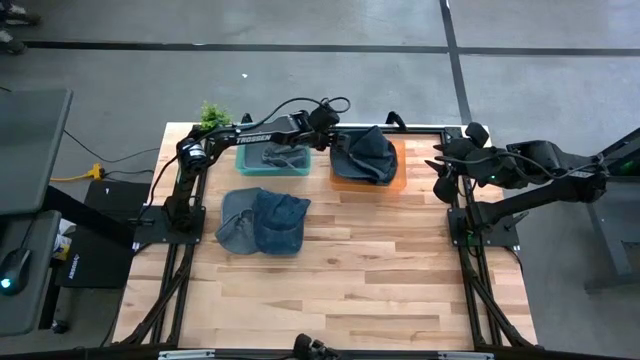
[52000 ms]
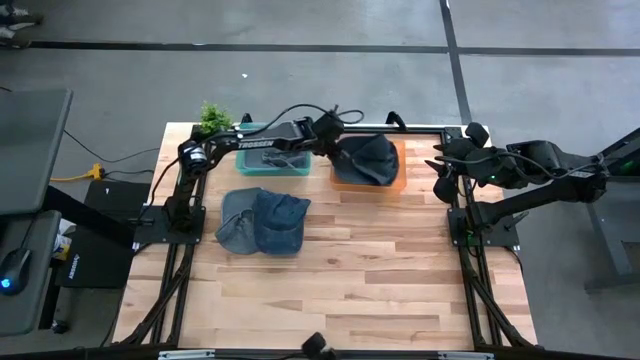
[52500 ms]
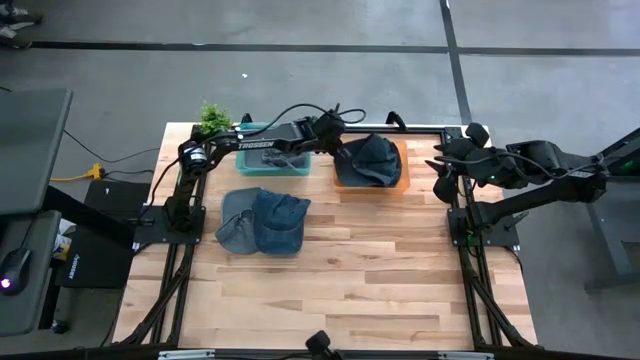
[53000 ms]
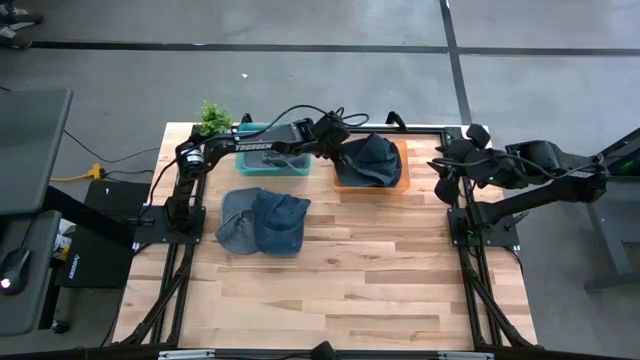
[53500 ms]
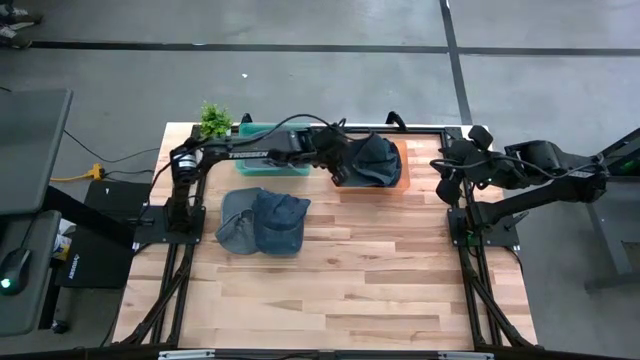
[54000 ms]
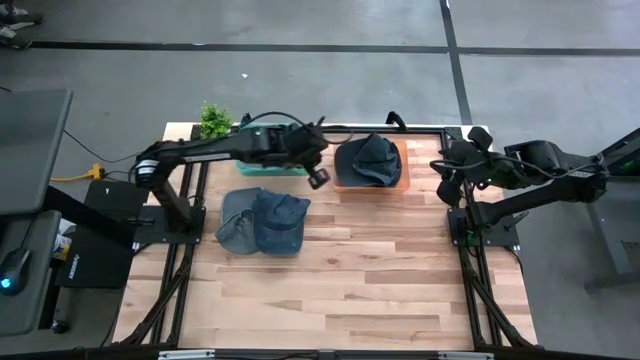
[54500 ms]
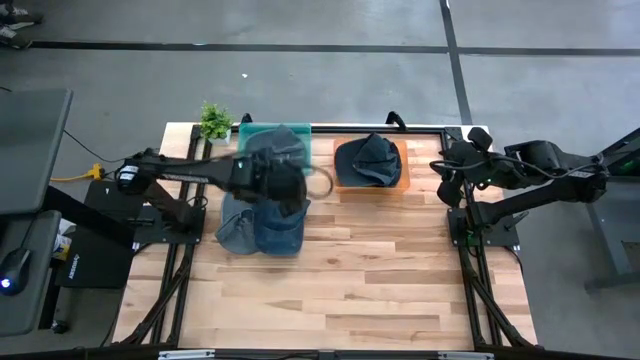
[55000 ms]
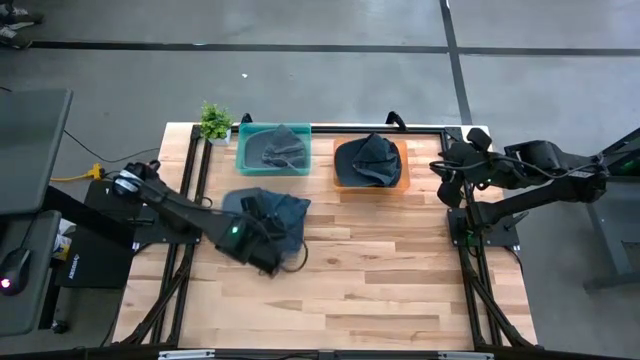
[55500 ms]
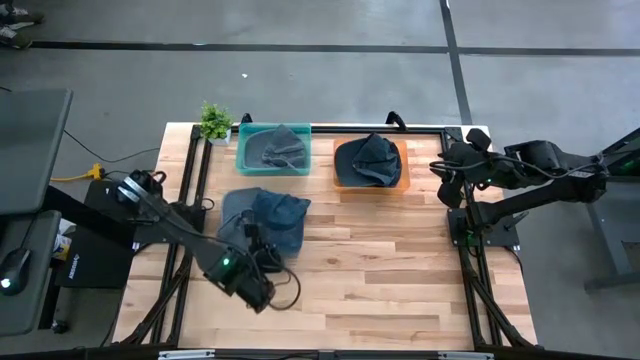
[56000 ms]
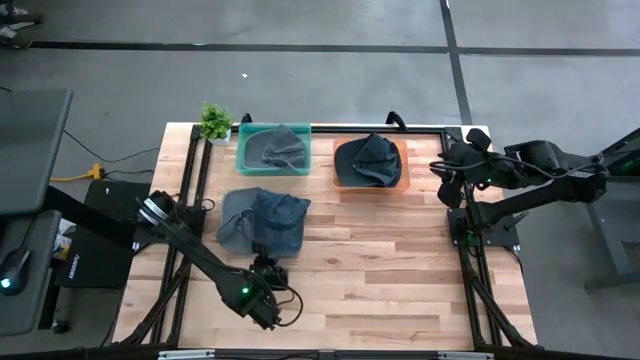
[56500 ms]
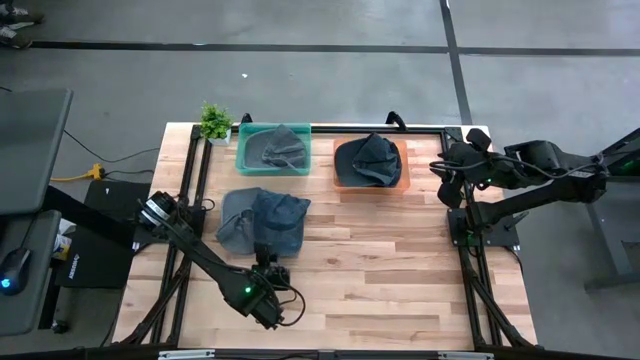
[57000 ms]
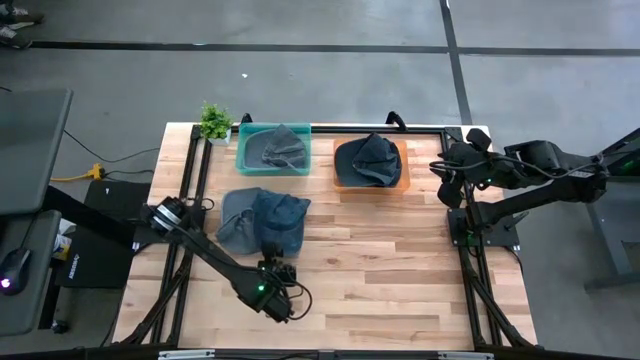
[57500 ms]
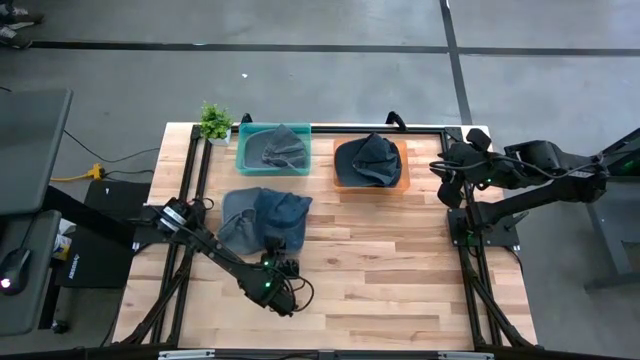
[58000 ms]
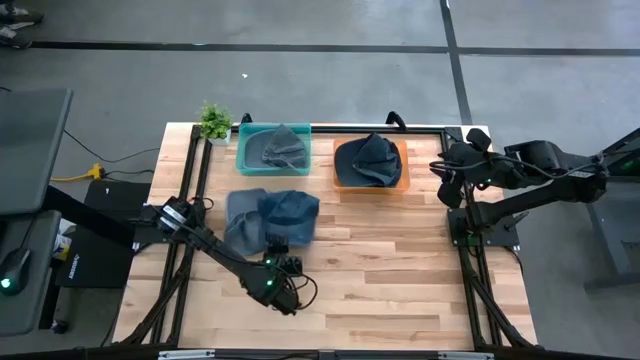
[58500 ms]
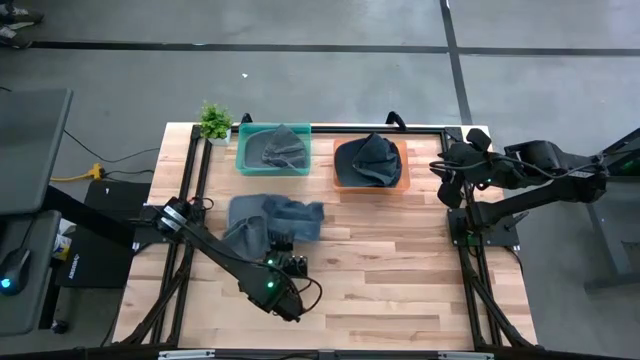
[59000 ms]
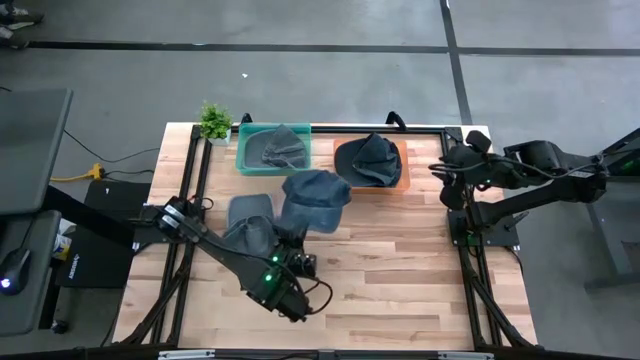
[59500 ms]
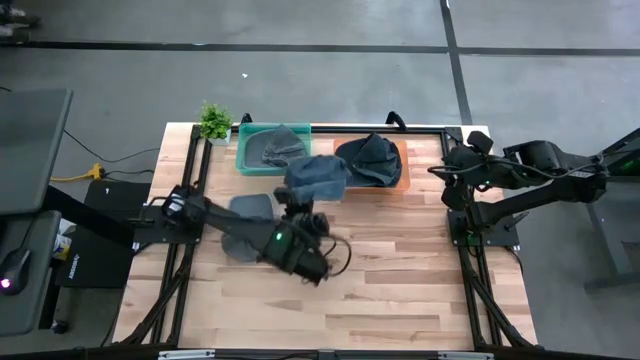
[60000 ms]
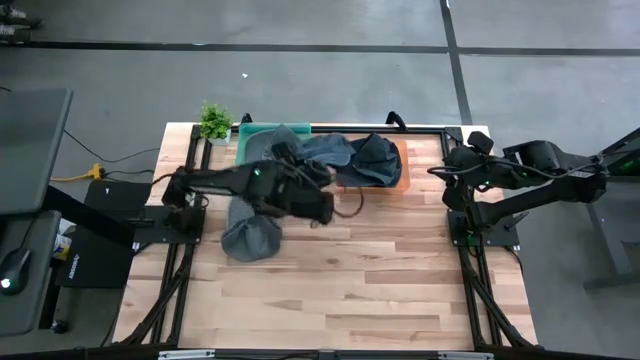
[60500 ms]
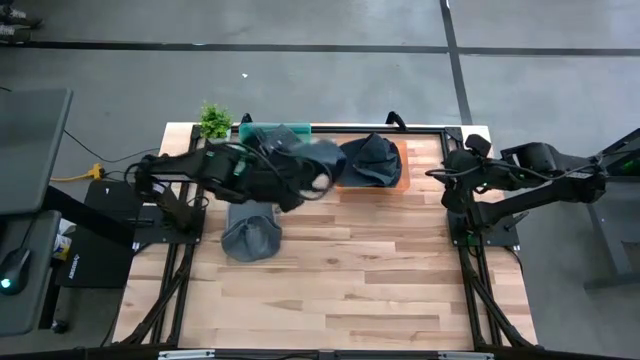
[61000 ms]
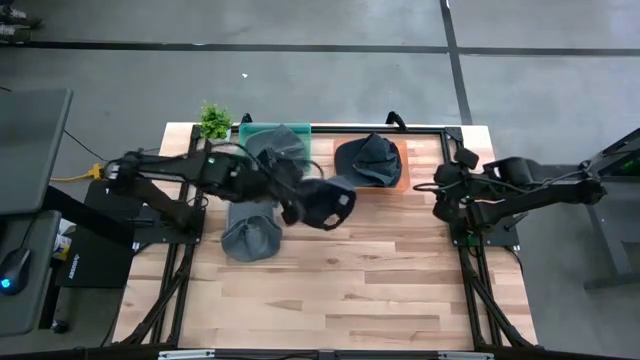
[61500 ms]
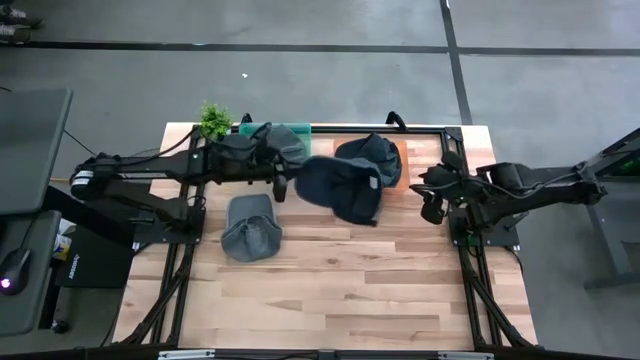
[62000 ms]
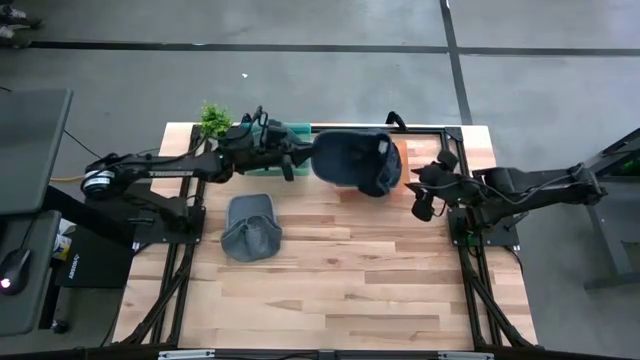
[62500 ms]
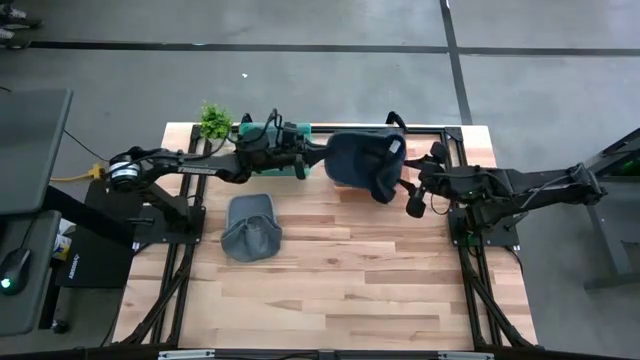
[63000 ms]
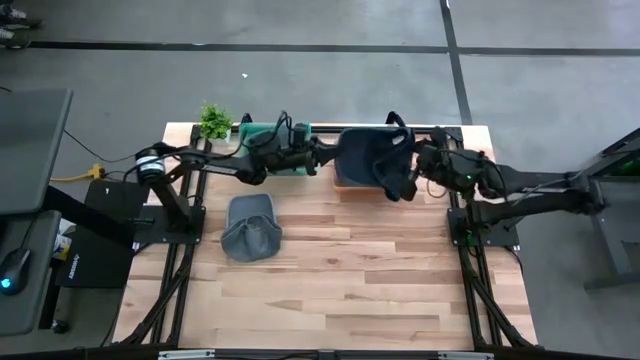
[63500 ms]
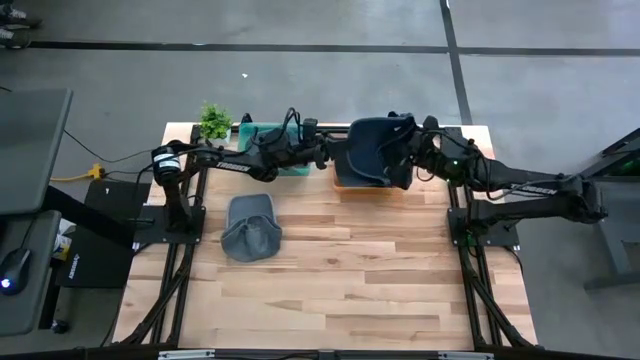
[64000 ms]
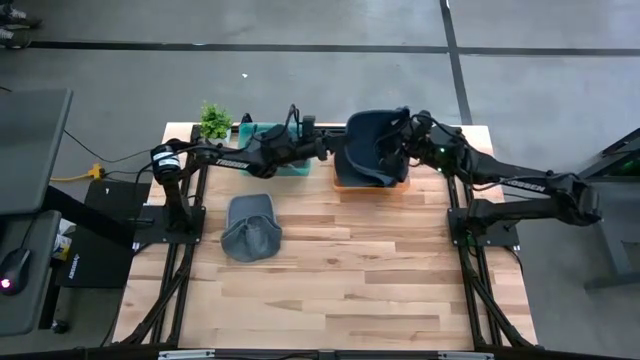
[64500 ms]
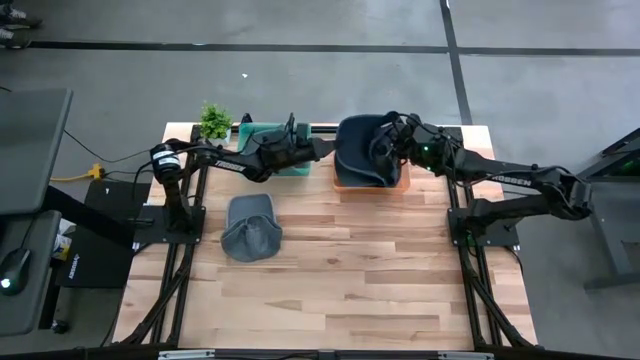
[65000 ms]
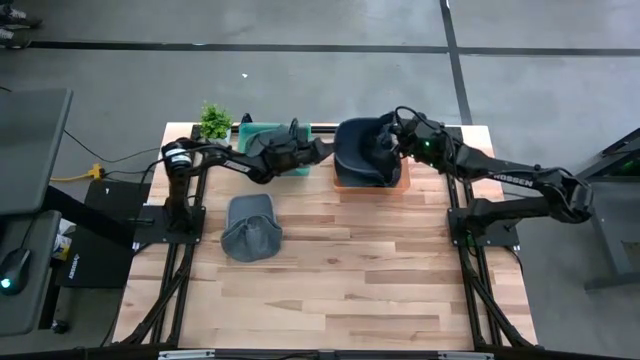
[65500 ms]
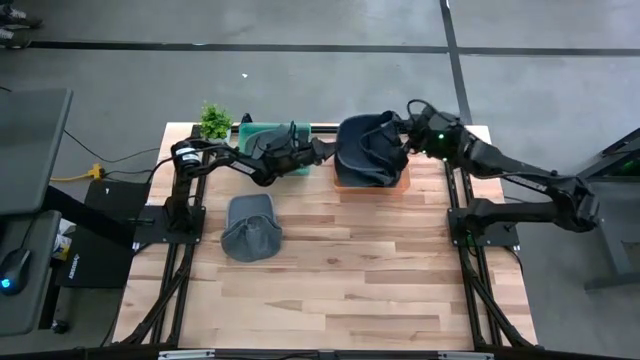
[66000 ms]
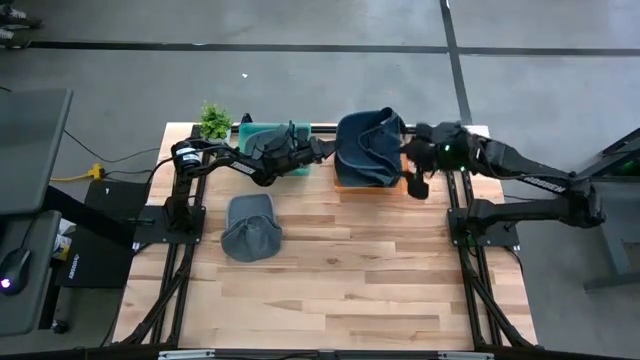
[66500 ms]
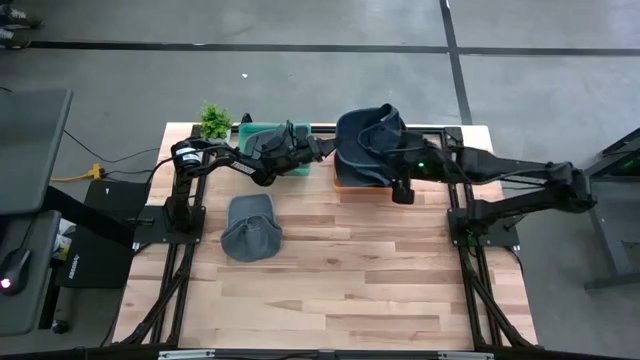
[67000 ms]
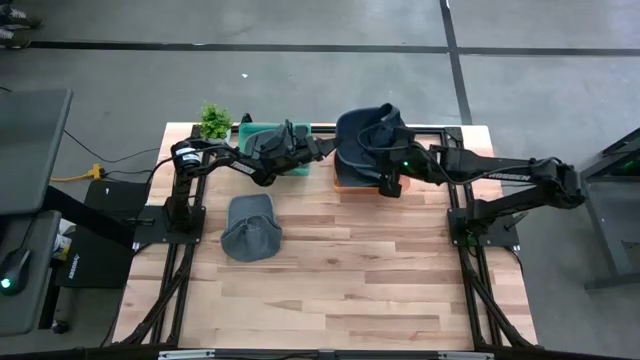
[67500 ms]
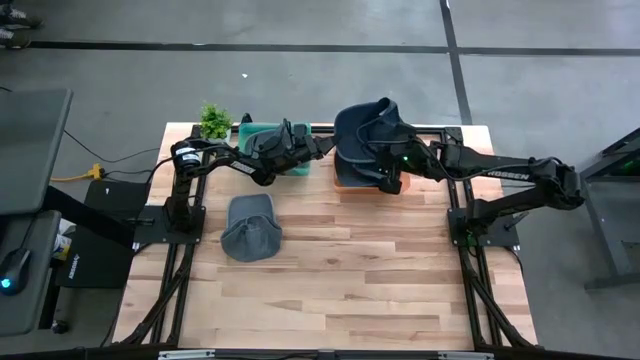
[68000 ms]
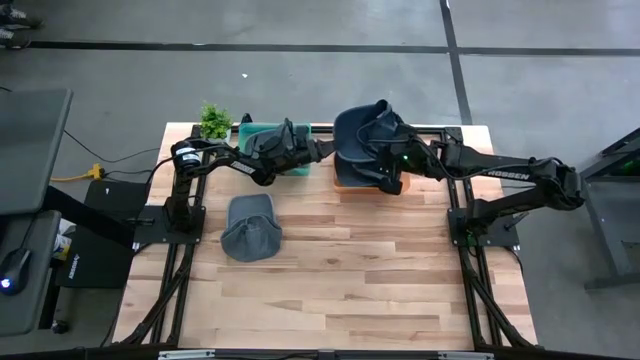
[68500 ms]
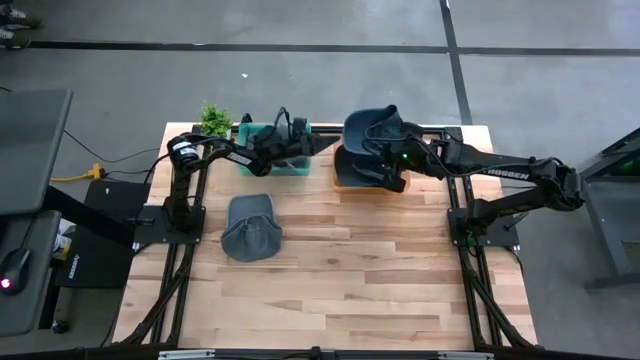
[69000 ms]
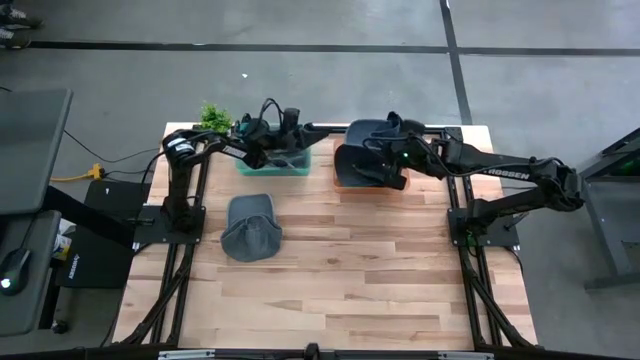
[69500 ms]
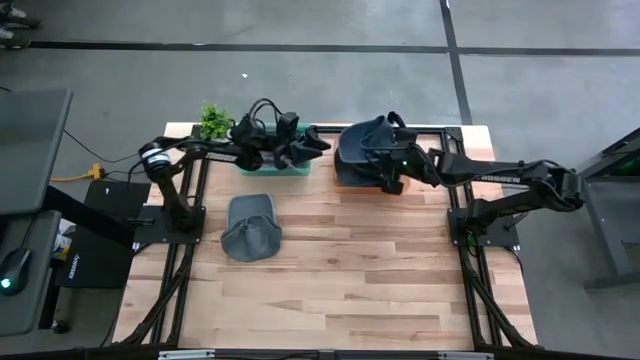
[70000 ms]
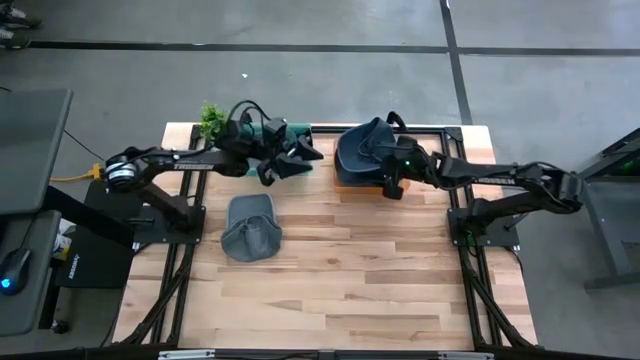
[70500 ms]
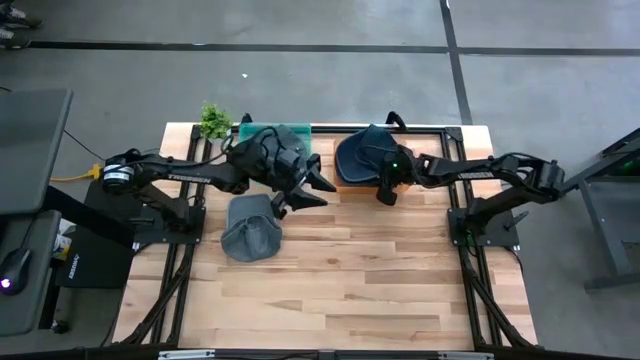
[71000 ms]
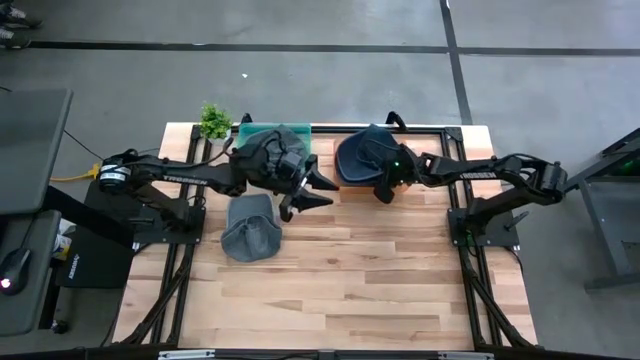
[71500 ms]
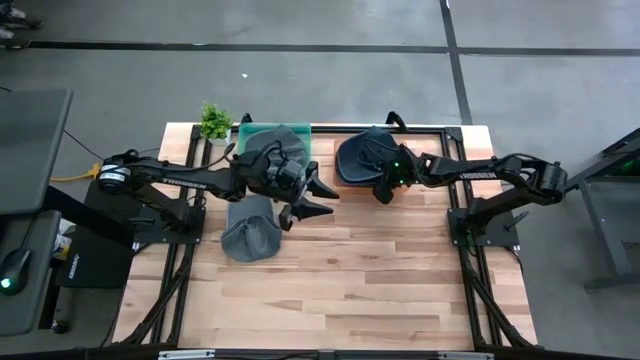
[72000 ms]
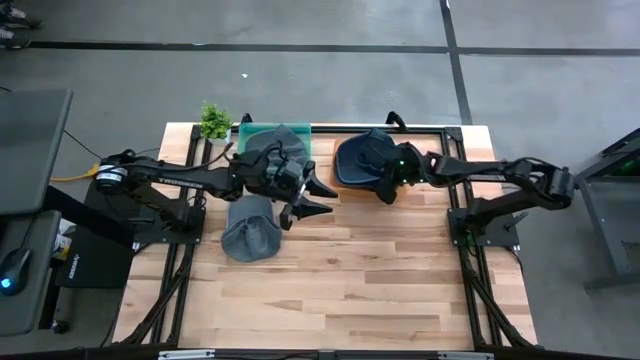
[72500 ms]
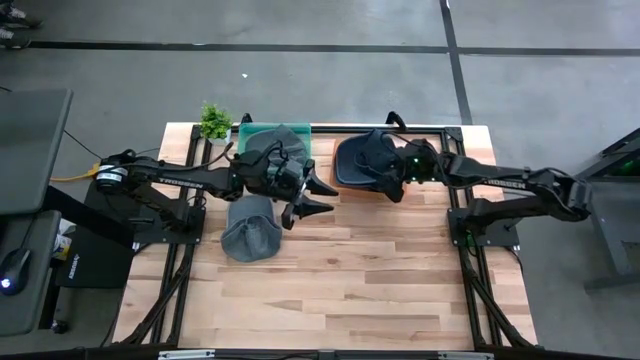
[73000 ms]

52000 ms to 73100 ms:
Task: Pick & Place hat
Put the blue cap into the orange bin
